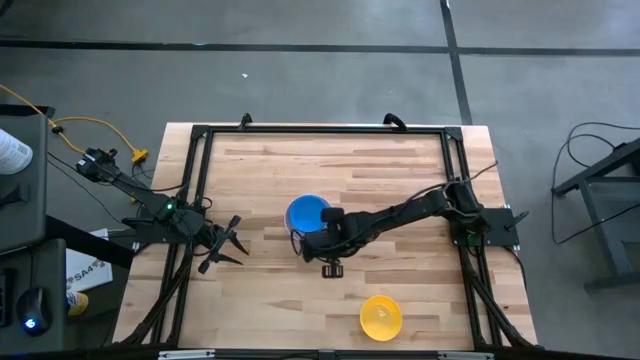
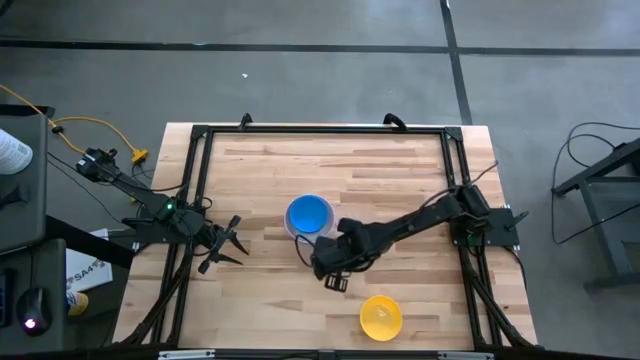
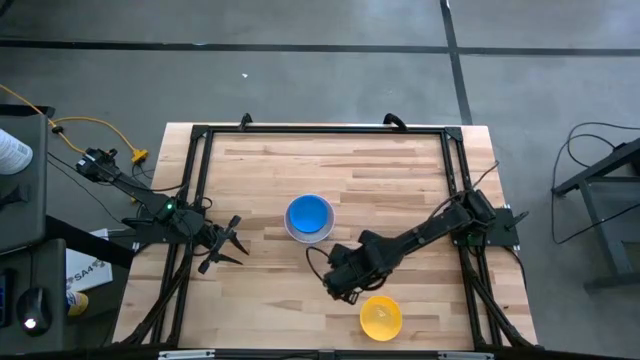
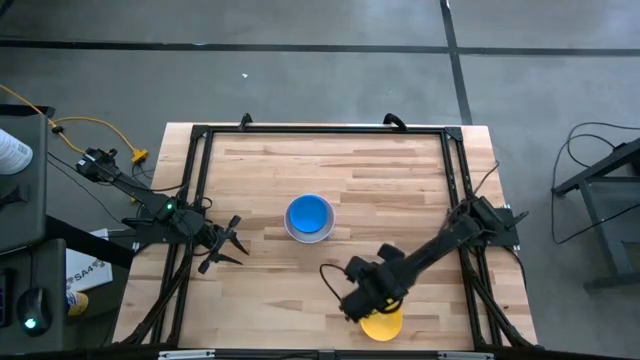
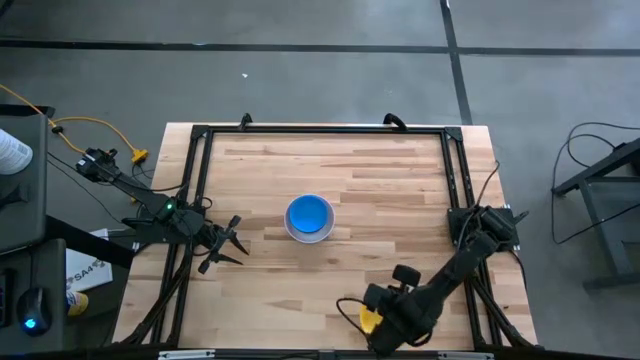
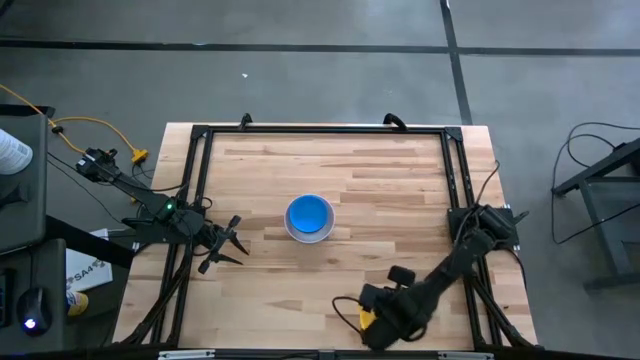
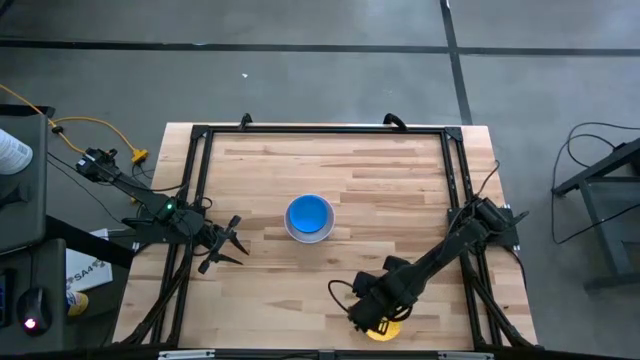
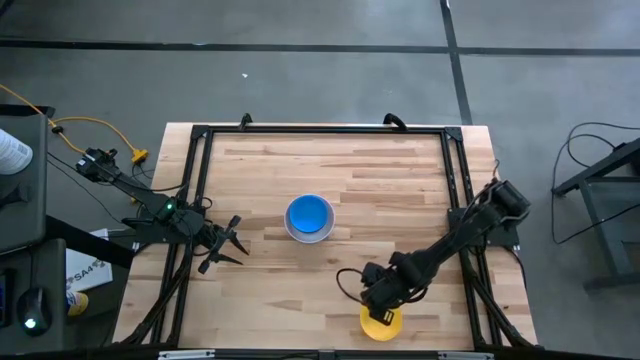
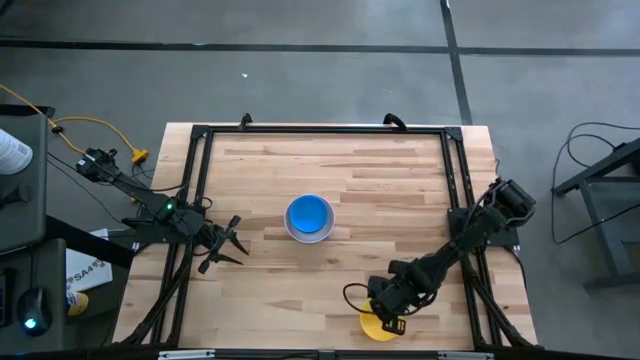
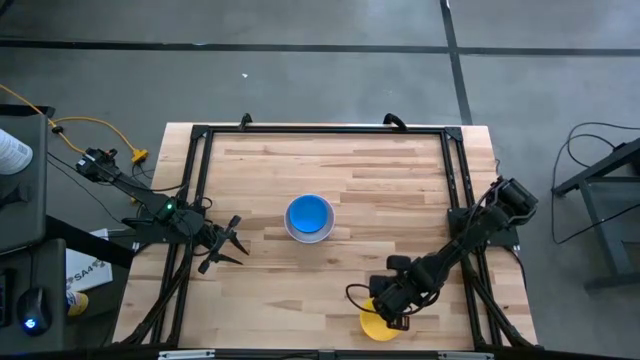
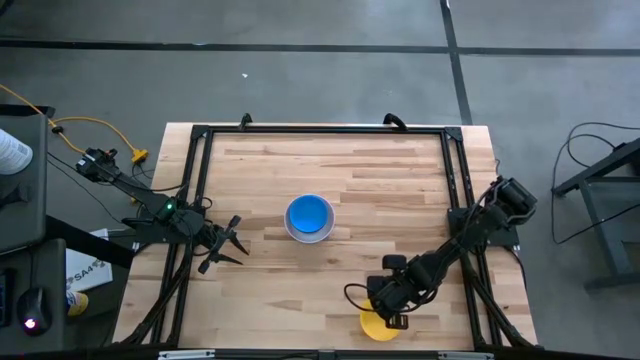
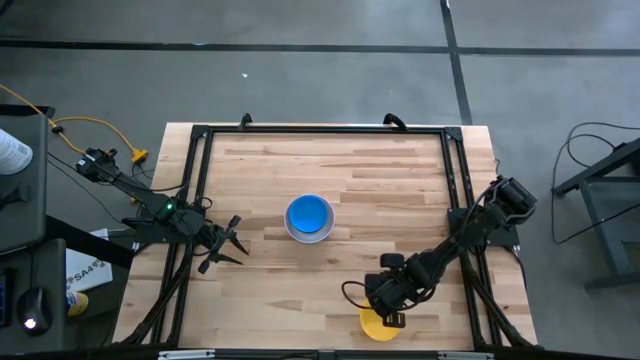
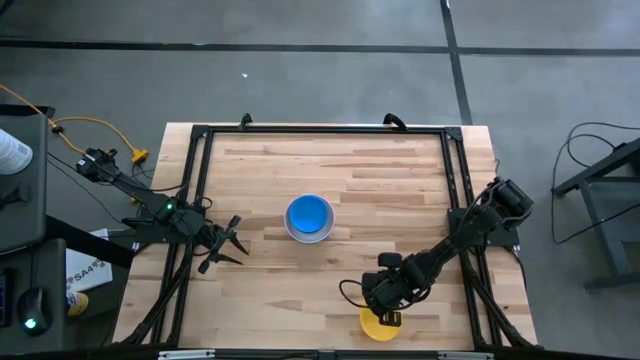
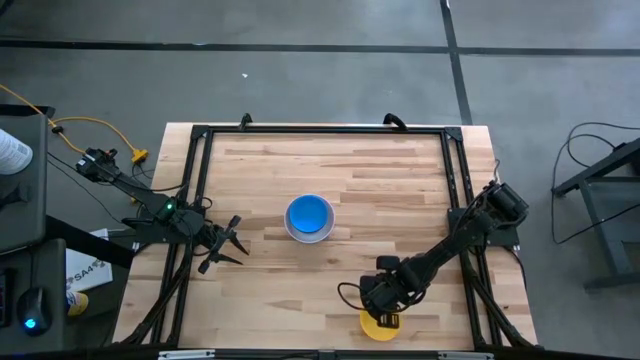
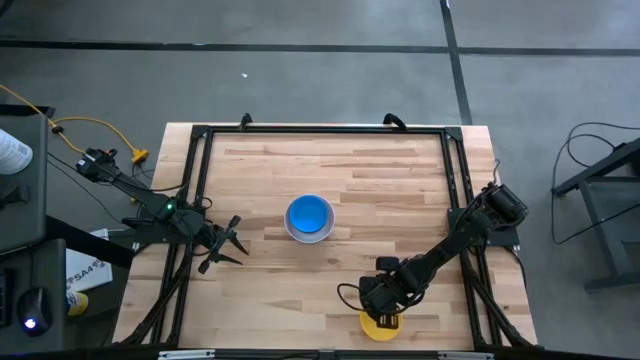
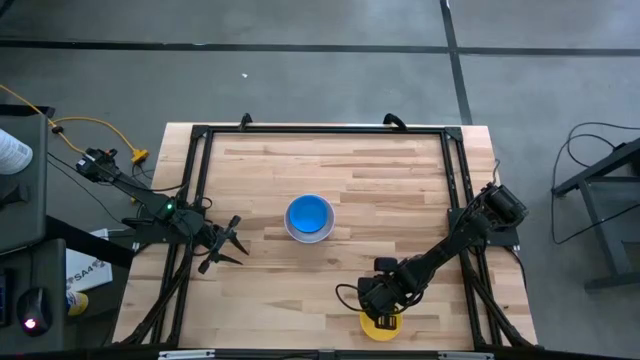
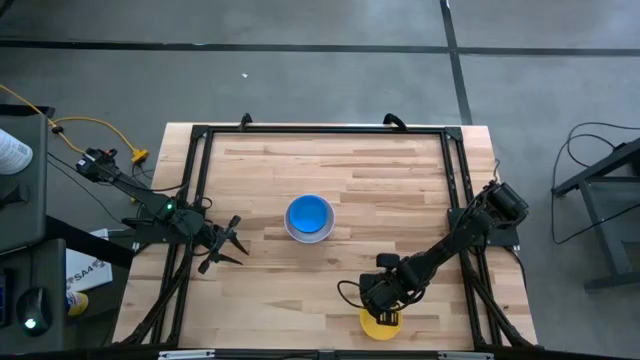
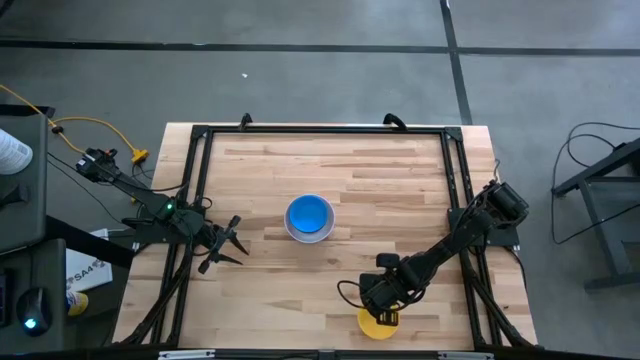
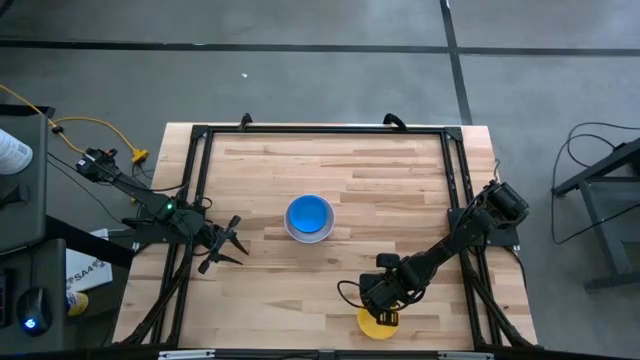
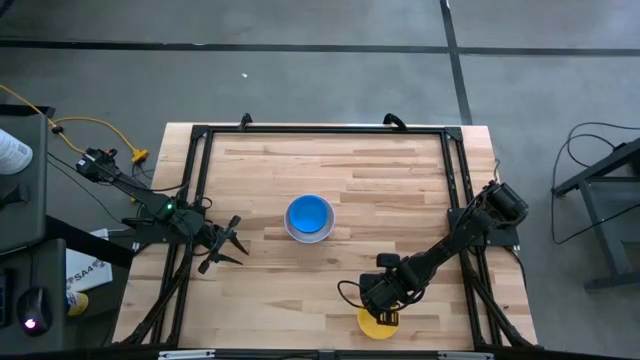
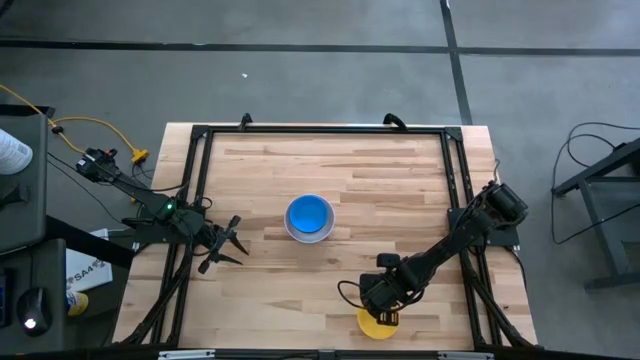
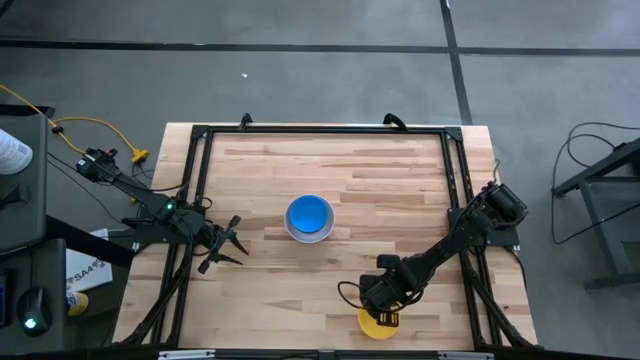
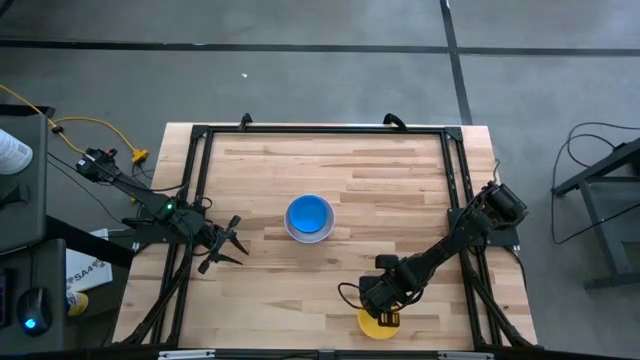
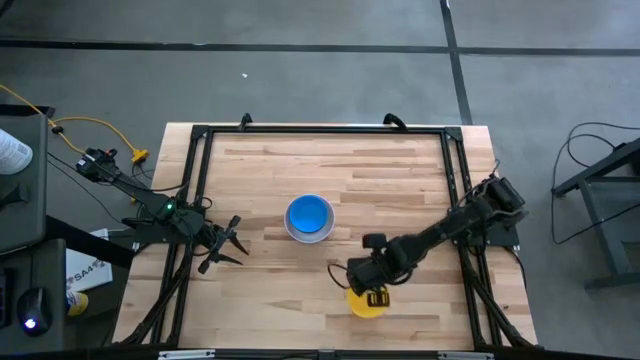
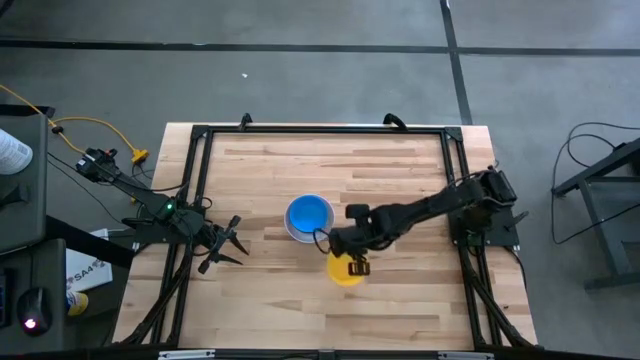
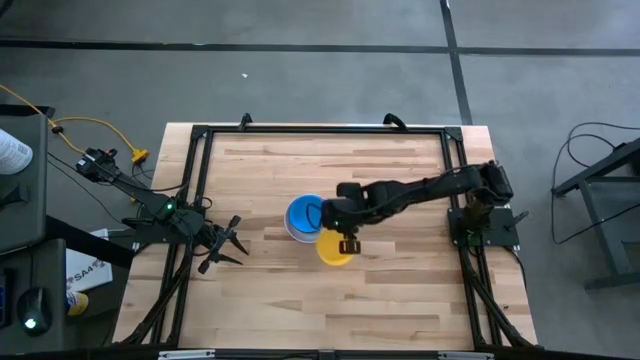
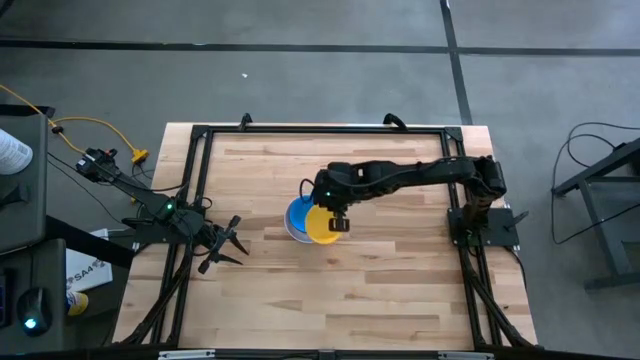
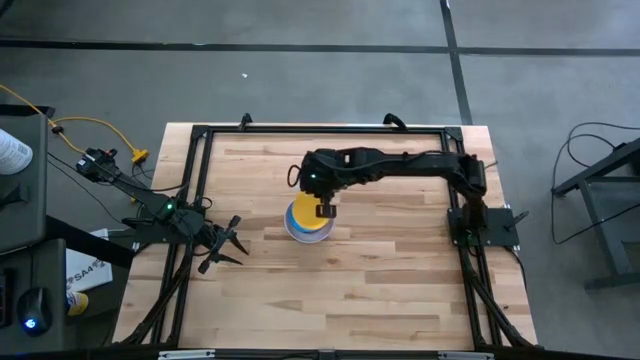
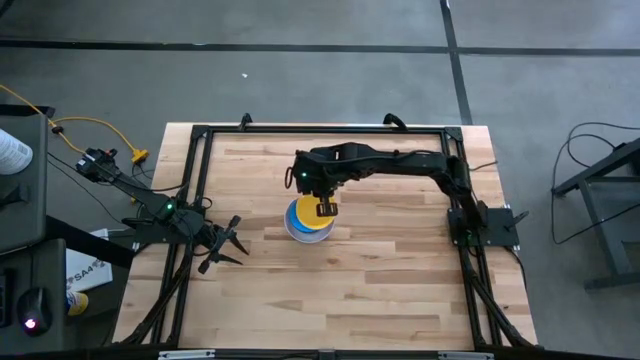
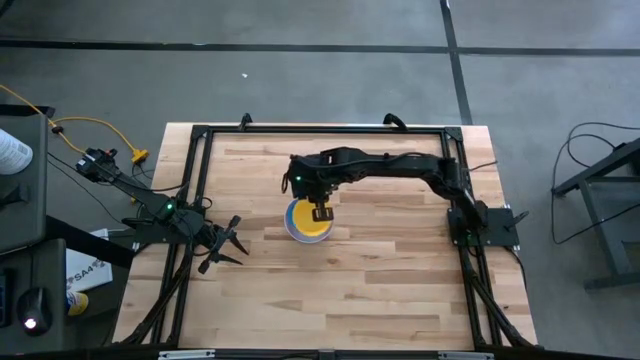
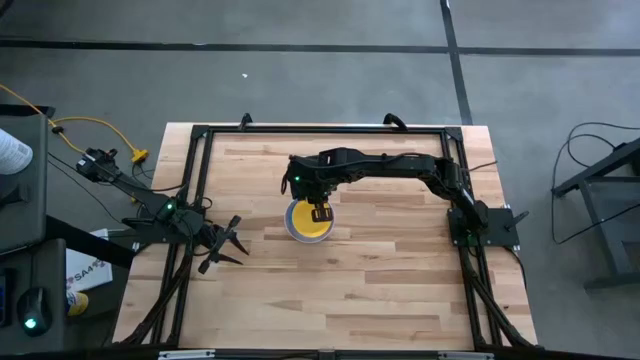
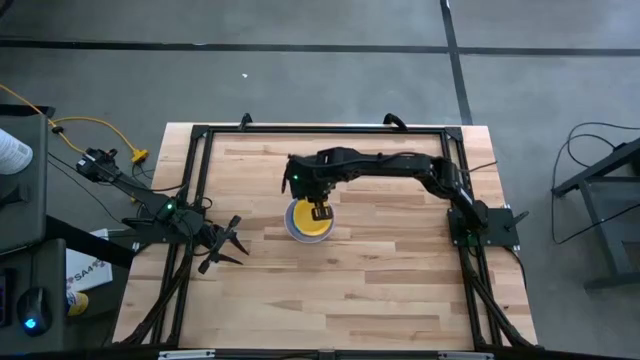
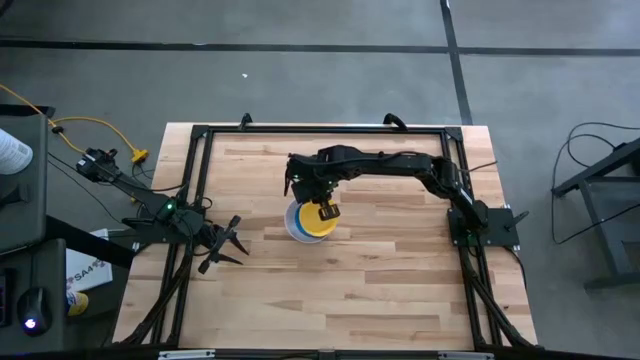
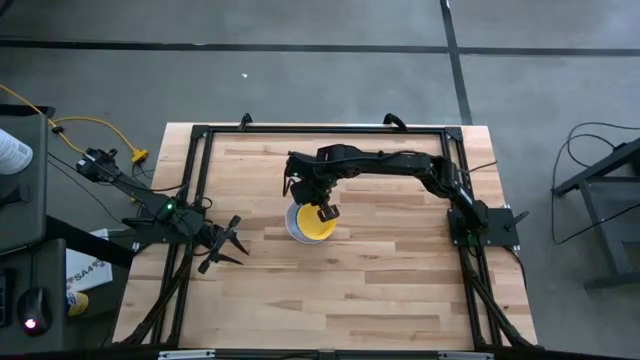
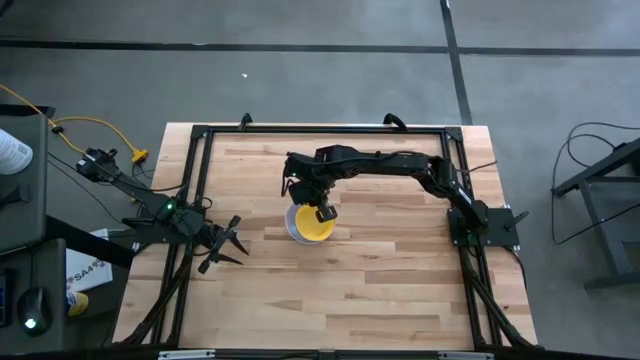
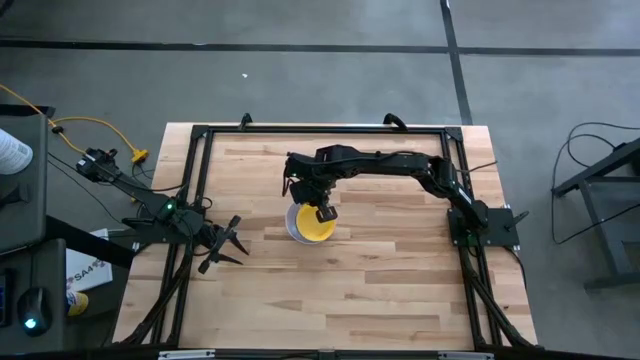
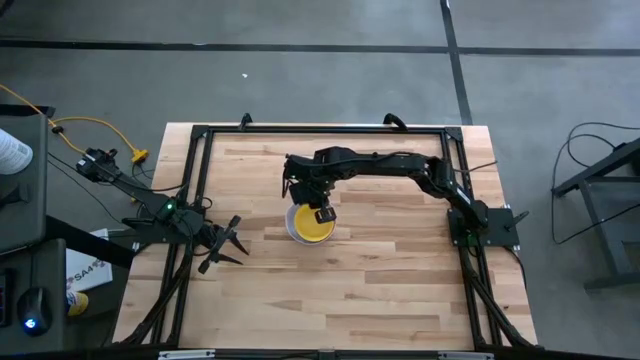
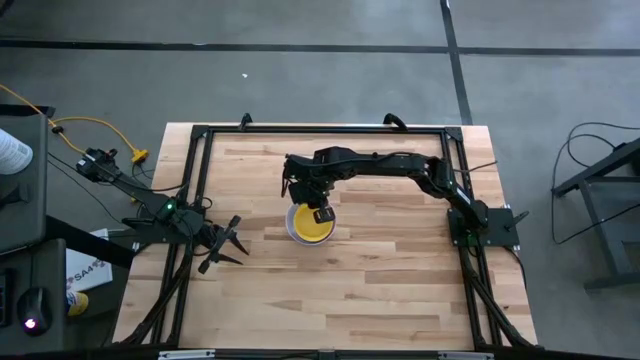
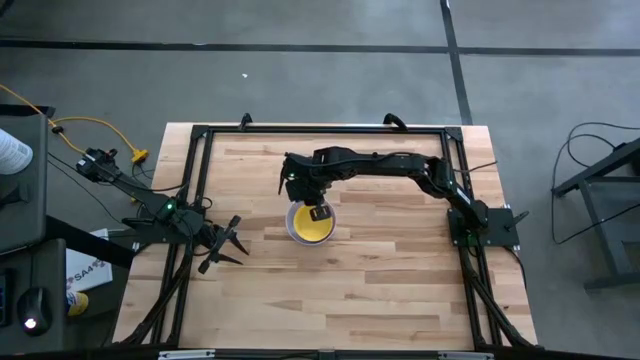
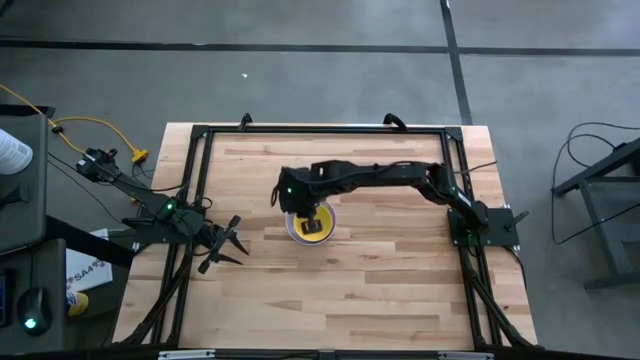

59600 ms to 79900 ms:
Stack the yellow bowl into the blue bowl
